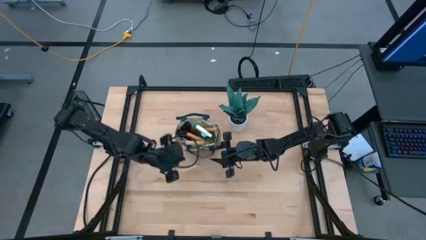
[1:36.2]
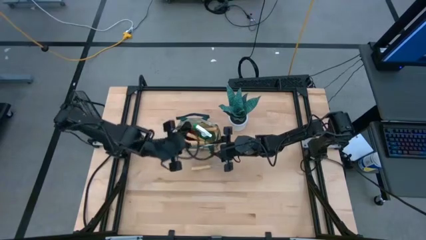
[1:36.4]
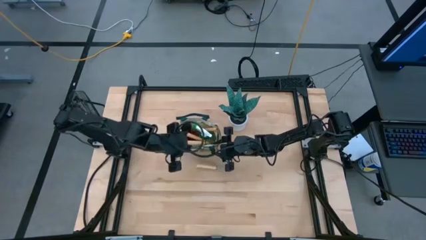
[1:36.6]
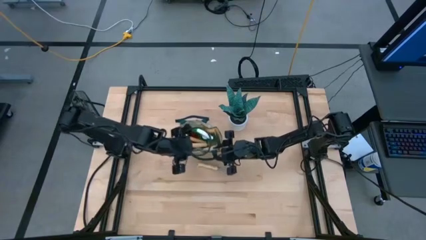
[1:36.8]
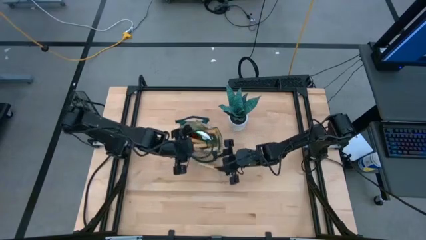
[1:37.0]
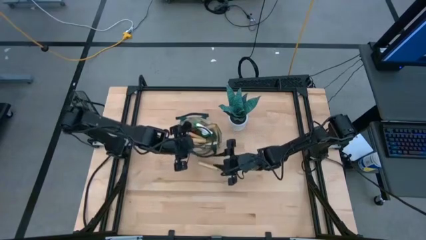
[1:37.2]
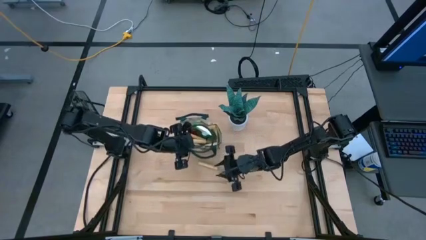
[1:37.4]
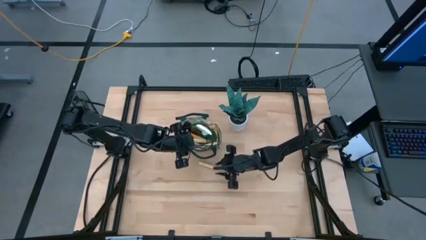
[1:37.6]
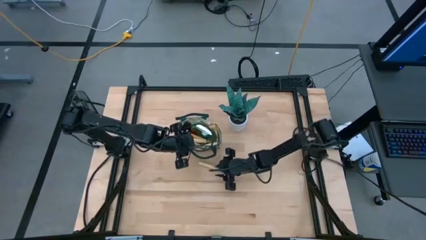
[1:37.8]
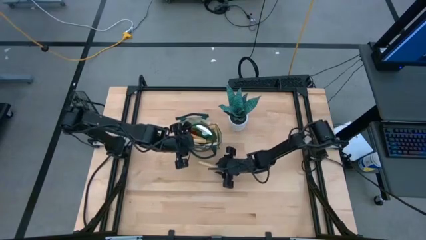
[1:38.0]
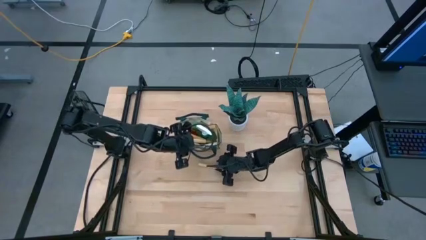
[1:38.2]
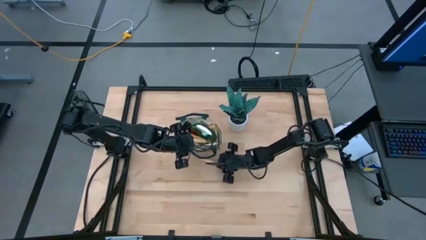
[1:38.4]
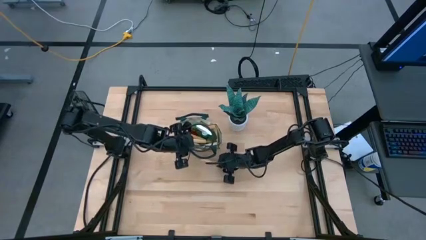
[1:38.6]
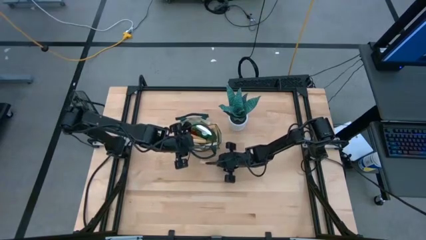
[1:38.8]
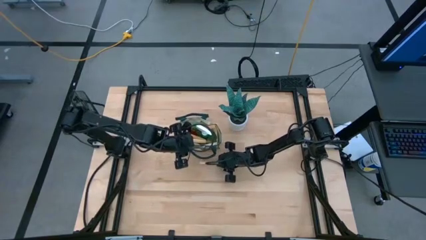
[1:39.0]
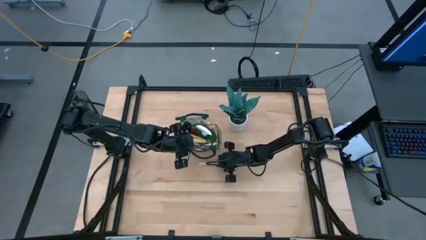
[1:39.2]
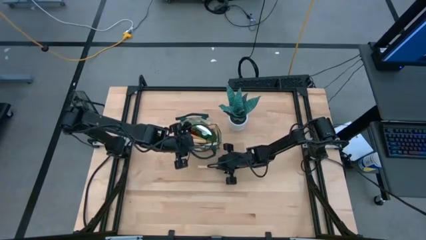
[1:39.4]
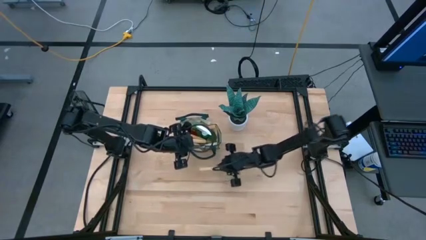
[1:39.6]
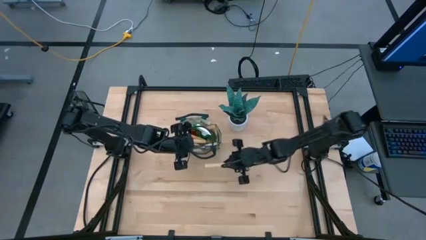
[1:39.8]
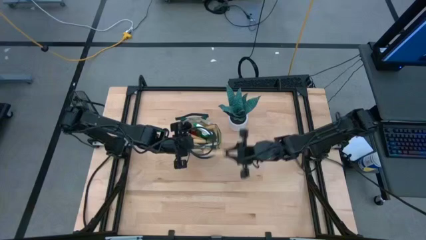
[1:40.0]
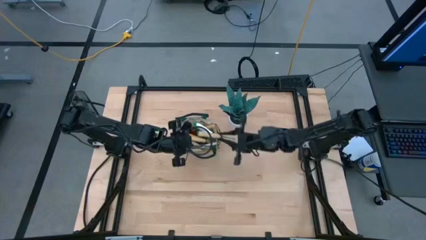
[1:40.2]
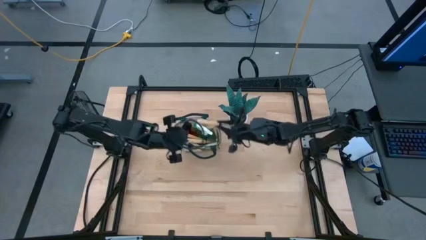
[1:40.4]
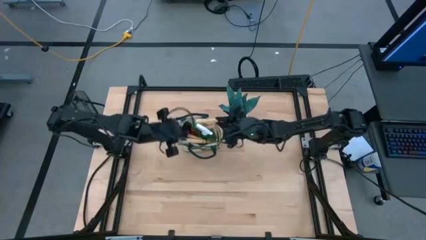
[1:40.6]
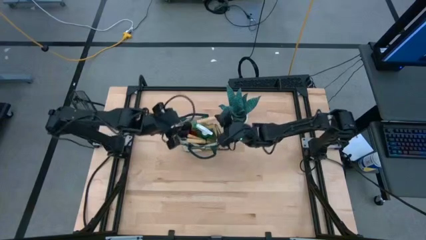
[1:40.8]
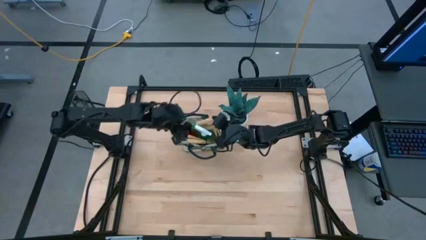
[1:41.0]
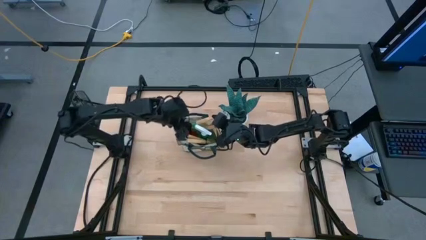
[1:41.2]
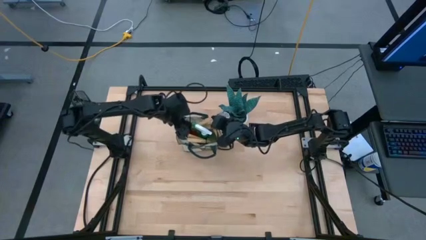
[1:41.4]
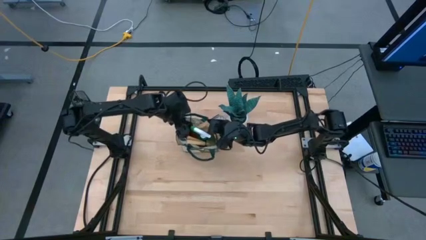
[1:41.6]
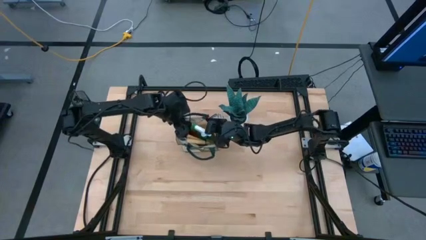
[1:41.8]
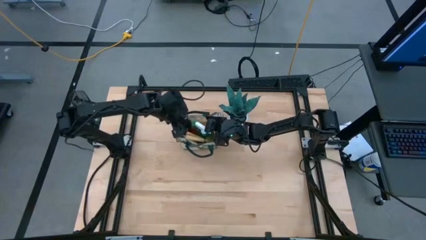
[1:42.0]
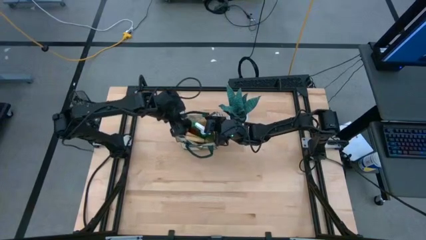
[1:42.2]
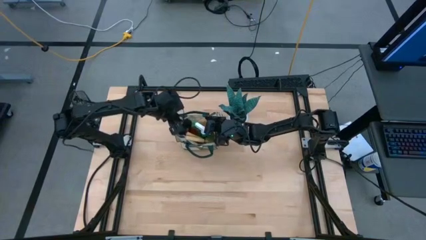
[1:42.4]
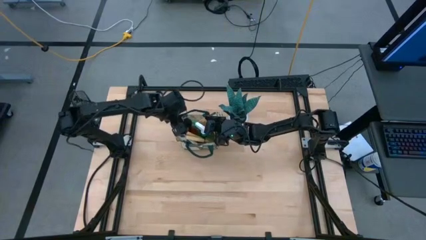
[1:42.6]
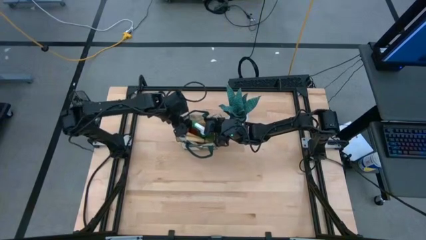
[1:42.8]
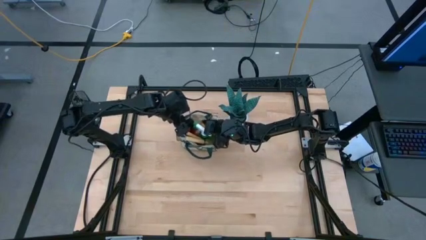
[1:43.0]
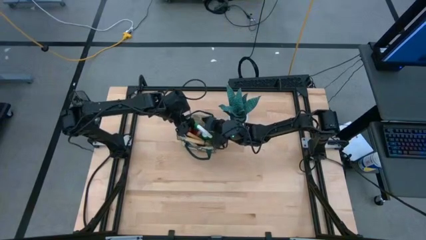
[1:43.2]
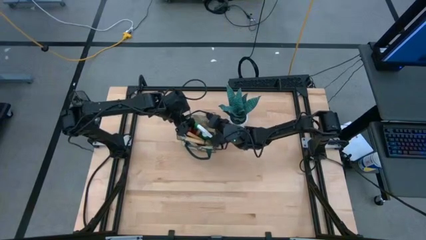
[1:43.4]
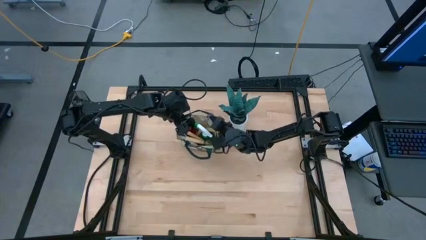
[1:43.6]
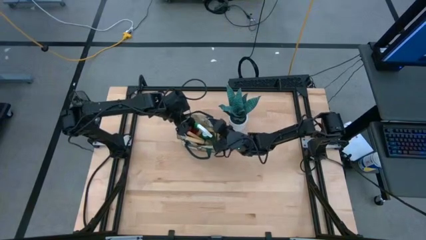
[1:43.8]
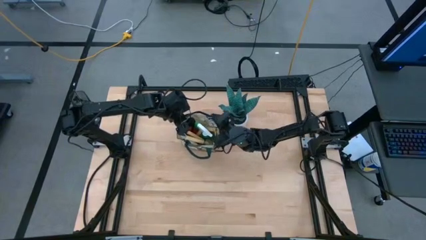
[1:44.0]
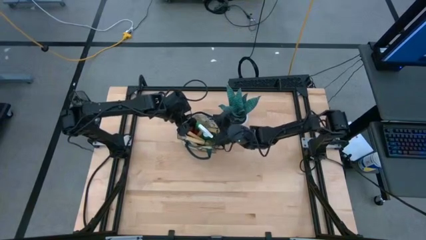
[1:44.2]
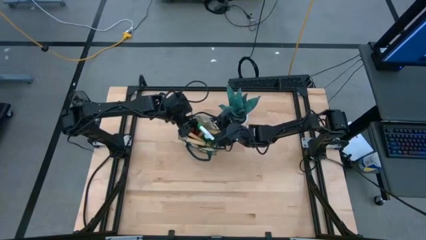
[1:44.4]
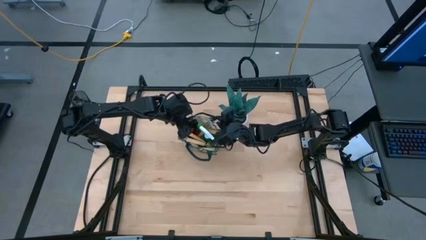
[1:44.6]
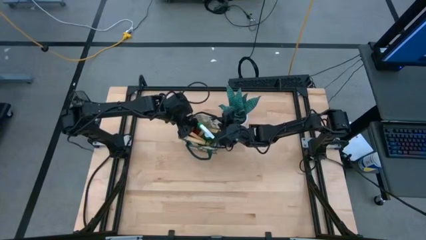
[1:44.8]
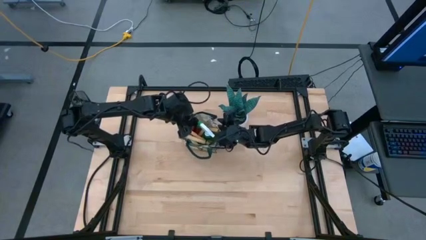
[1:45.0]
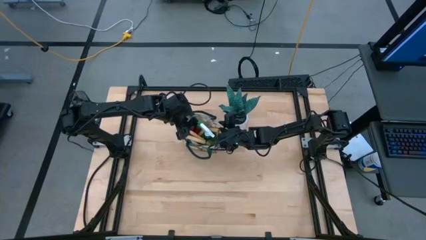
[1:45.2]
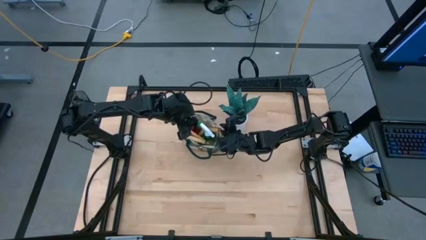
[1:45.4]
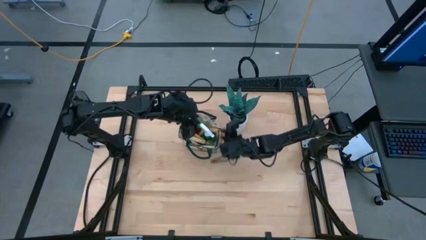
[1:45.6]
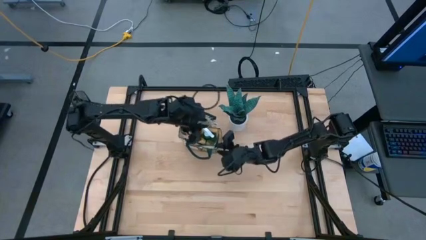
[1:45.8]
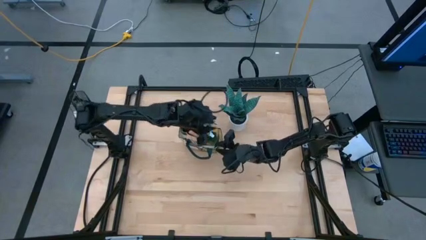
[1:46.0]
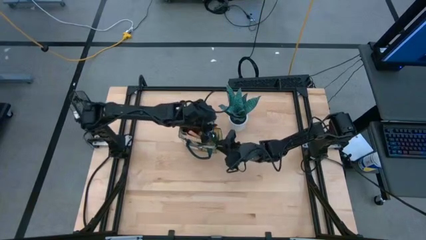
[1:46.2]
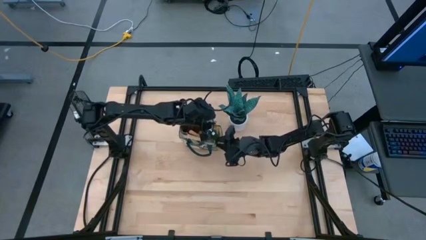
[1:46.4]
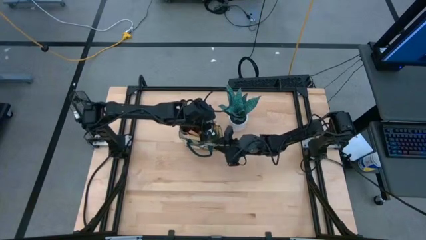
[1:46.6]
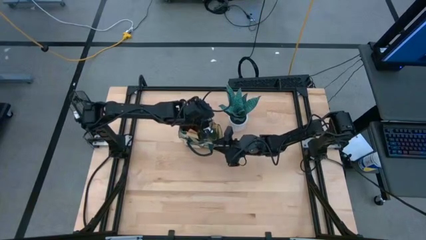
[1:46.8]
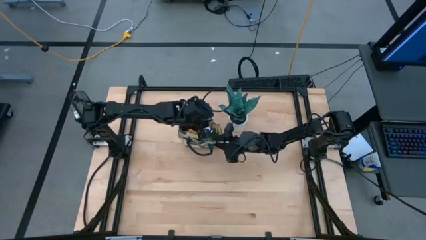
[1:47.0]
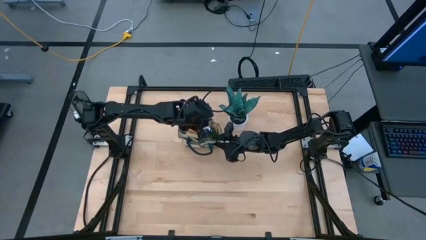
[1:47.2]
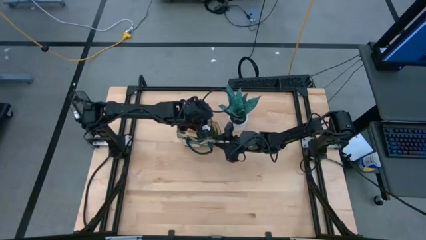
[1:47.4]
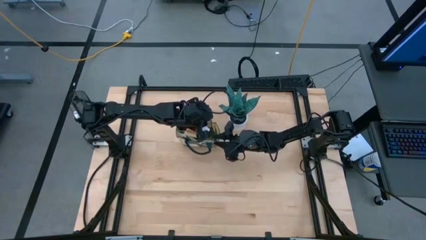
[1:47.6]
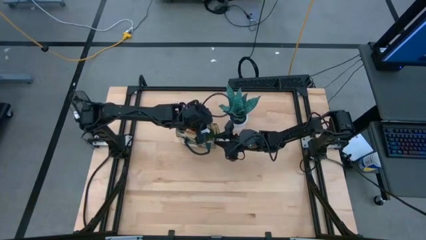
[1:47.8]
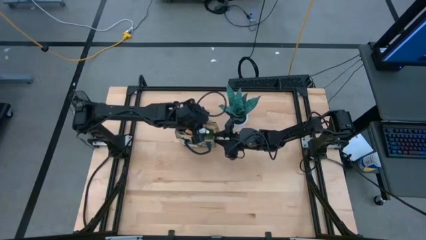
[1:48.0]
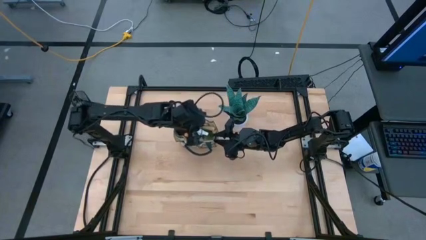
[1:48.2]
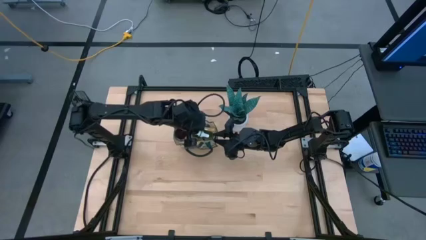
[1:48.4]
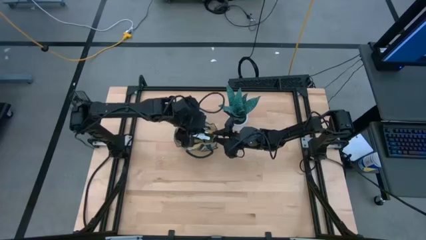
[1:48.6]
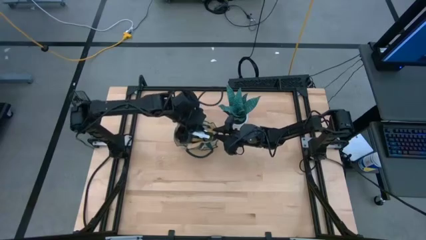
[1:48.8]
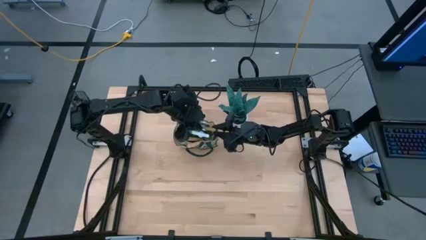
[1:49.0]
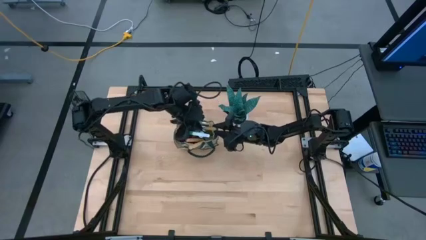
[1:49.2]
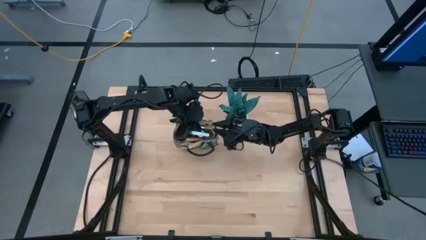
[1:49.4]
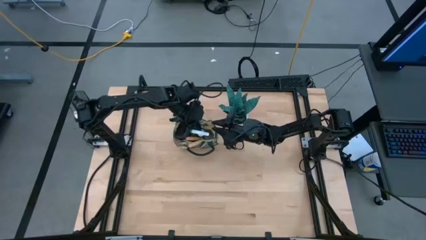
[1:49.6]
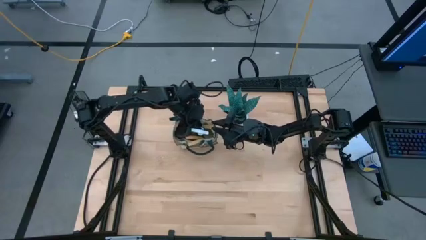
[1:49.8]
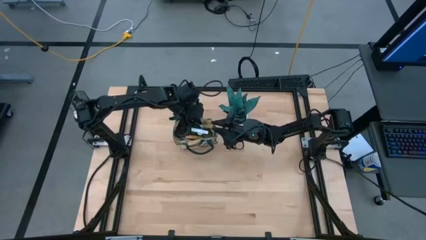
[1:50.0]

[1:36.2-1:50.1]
Task: Pick & Place Garden tools in Gardening bag
Put the brown hand rake into the white gardening bag

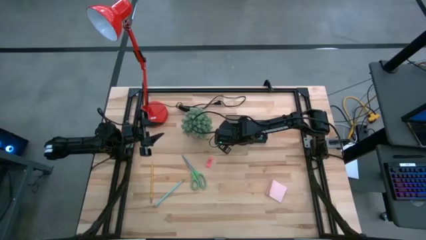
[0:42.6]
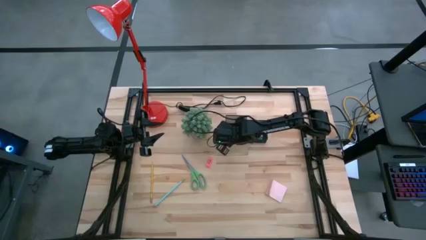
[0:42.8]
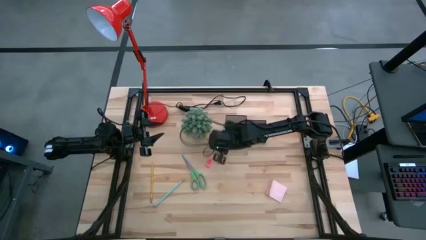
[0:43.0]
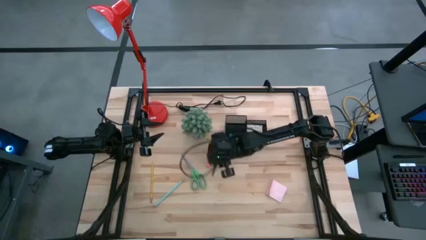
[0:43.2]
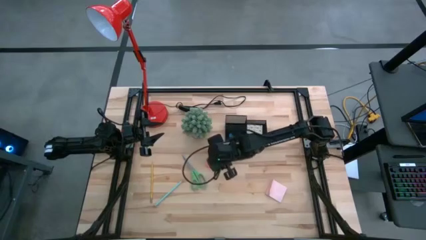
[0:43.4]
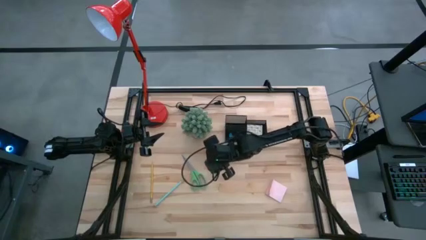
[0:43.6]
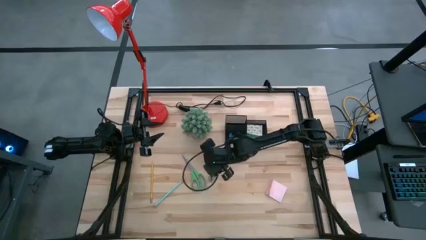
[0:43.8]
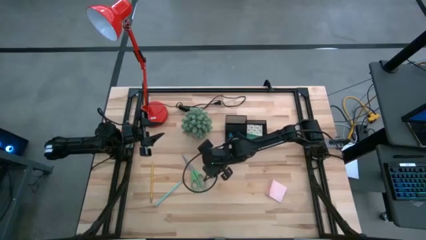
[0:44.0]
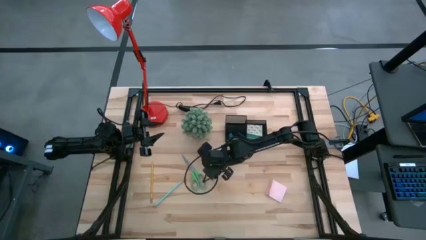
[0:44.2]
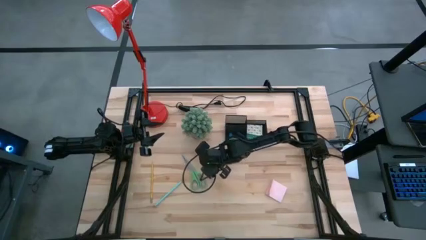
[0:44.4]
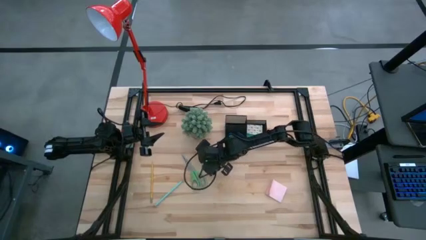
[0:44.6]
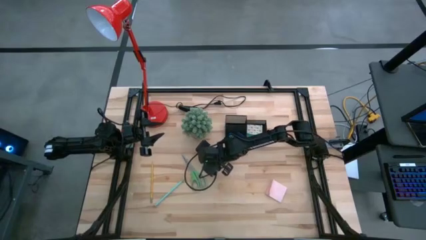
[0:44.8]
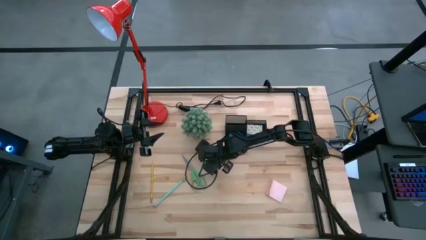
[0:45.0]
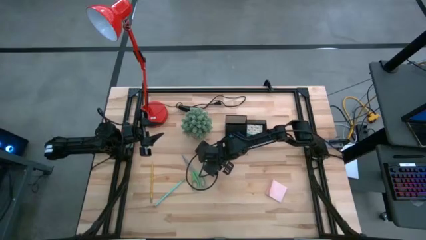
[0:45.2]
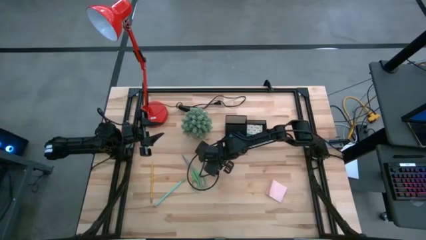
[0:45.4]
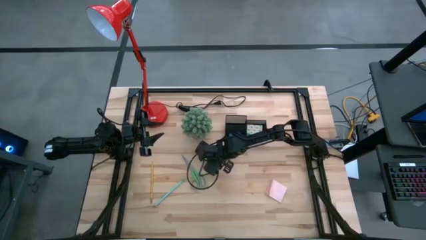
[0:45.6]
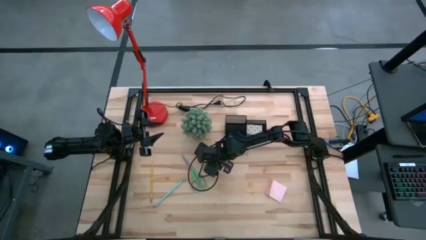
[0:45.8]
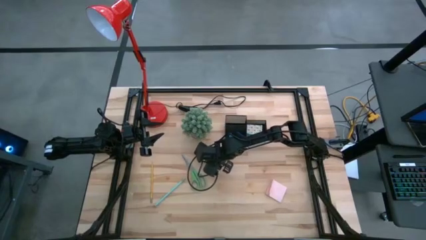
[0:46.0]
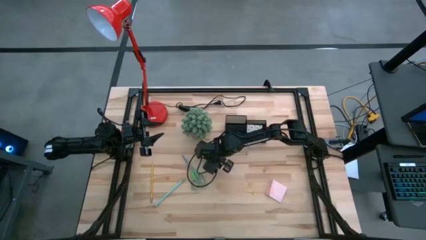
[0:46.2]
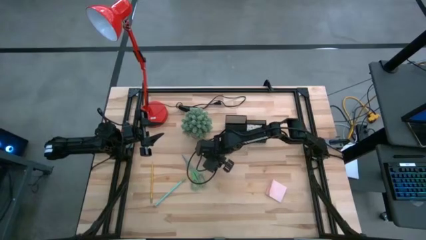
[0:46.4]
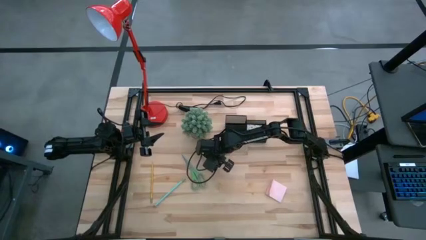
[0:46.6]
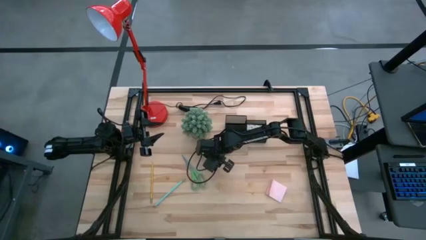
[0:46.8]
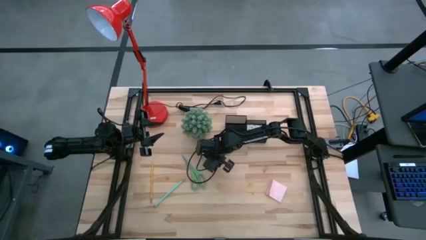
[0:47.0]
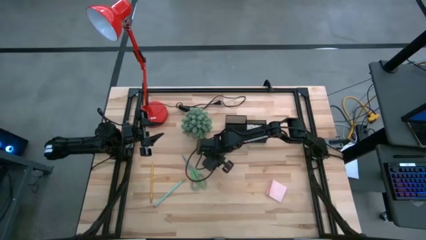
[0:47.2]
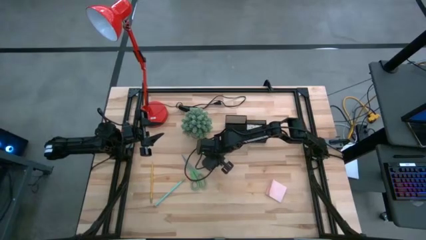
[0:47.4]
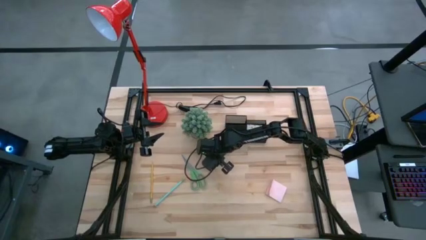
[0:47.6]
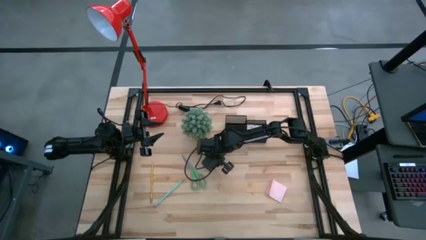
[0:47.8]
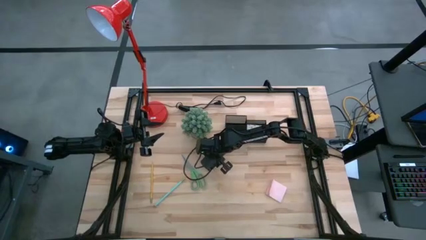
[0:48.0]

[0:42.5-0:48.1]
Task: Pick and place office supplies into organizer
Put the pink eraser into the black desk organizer
